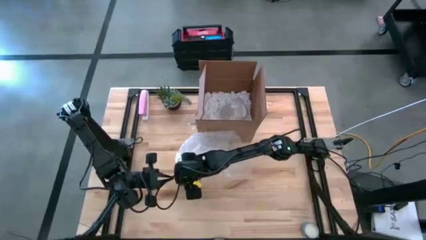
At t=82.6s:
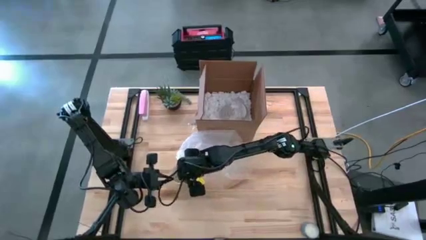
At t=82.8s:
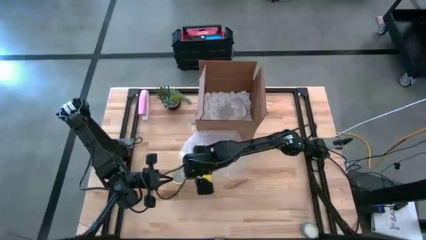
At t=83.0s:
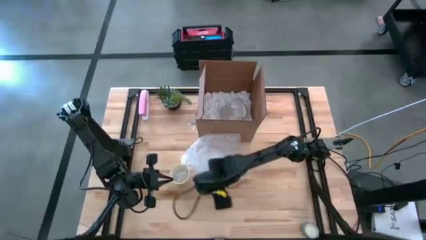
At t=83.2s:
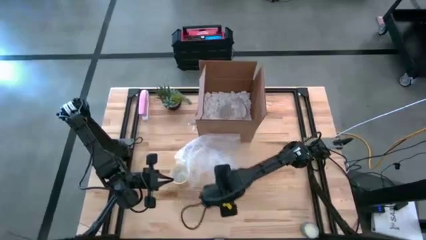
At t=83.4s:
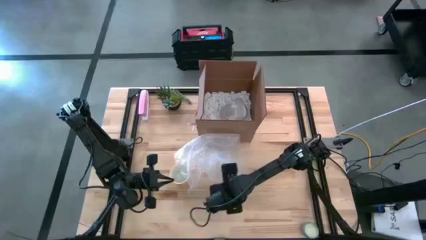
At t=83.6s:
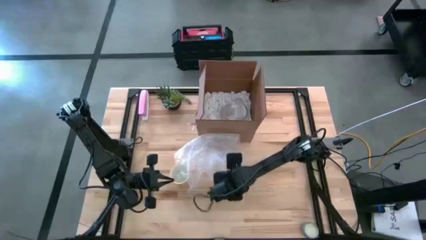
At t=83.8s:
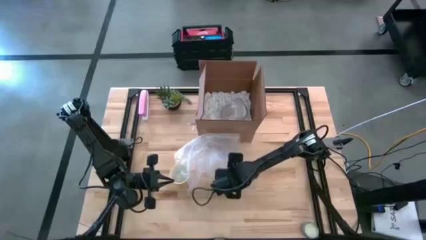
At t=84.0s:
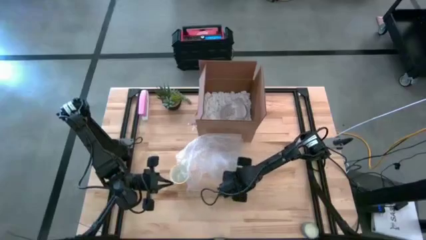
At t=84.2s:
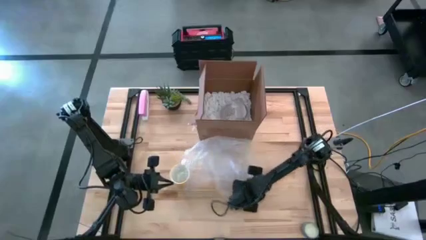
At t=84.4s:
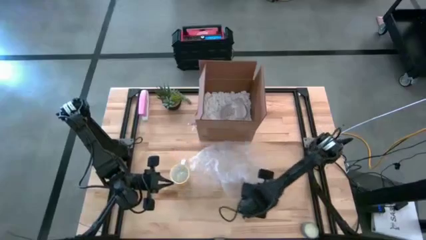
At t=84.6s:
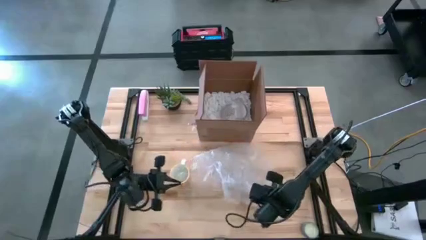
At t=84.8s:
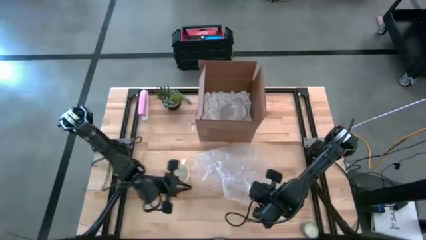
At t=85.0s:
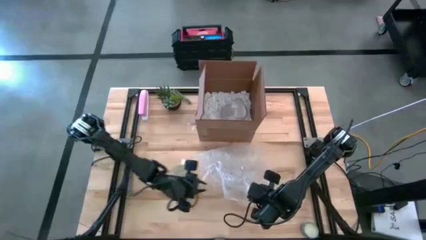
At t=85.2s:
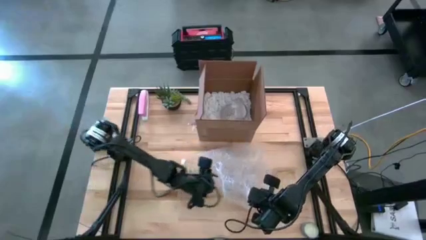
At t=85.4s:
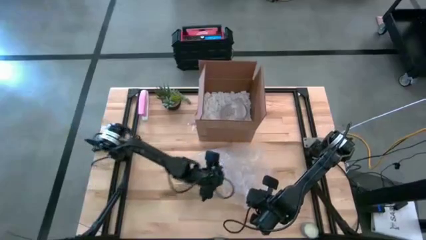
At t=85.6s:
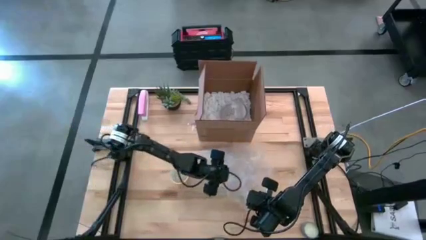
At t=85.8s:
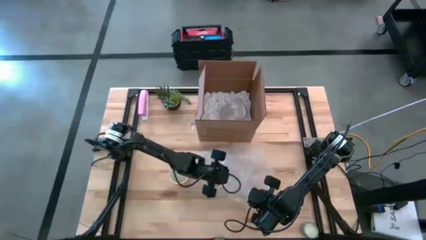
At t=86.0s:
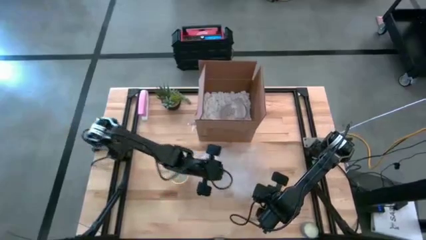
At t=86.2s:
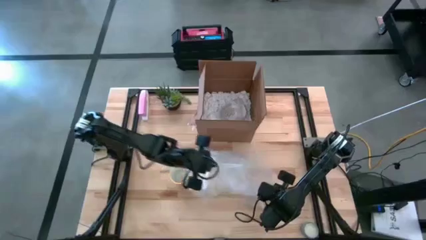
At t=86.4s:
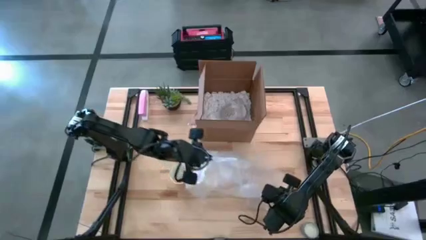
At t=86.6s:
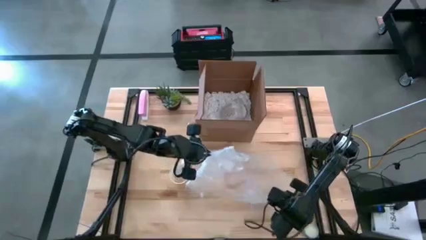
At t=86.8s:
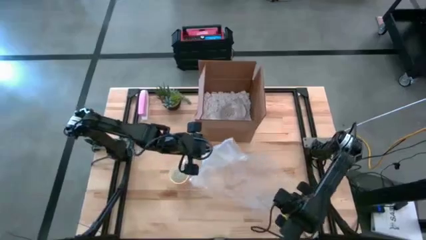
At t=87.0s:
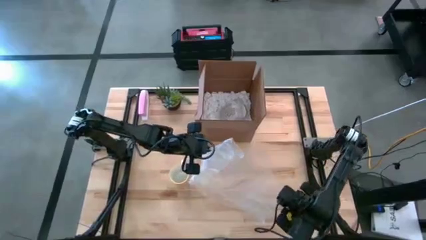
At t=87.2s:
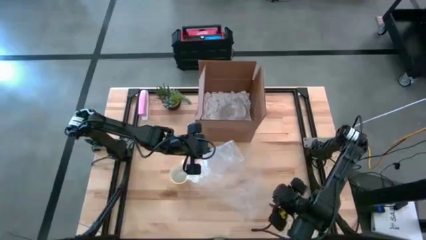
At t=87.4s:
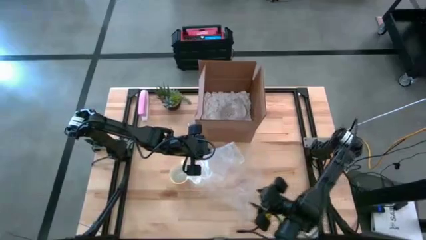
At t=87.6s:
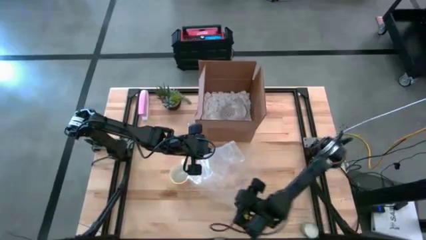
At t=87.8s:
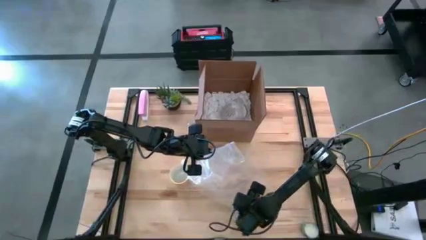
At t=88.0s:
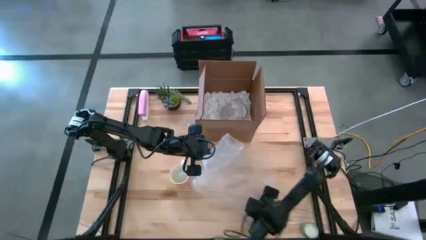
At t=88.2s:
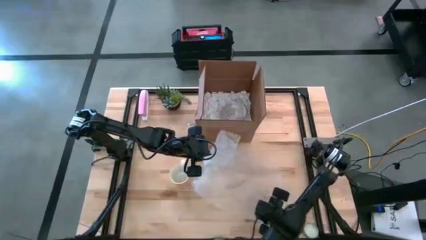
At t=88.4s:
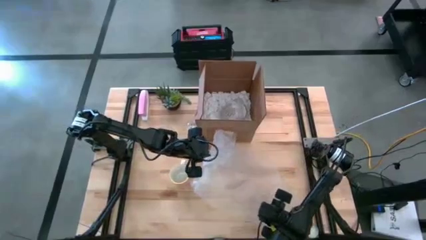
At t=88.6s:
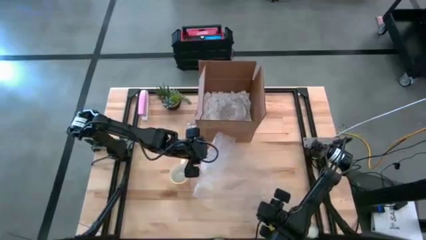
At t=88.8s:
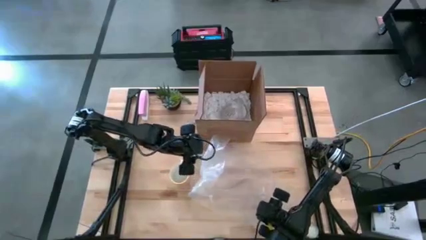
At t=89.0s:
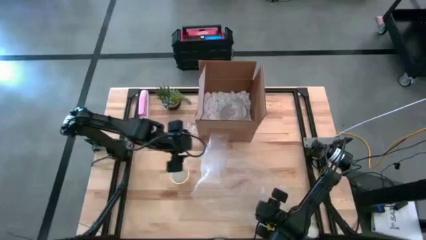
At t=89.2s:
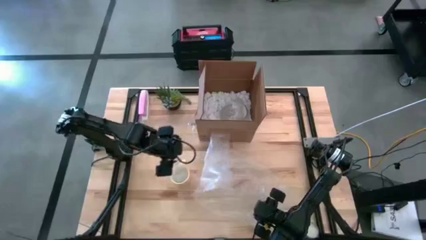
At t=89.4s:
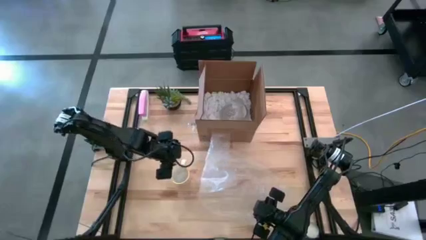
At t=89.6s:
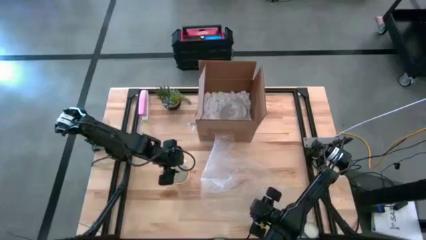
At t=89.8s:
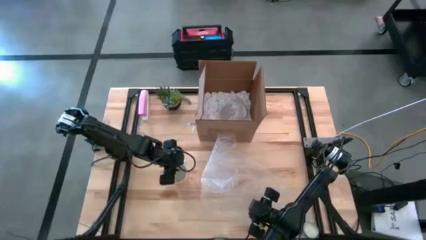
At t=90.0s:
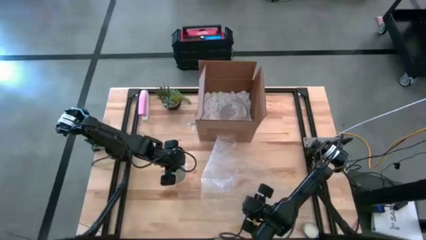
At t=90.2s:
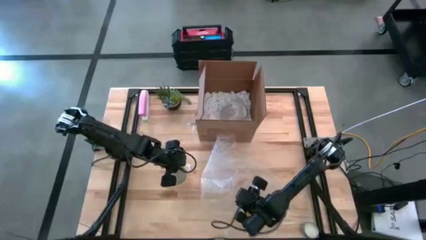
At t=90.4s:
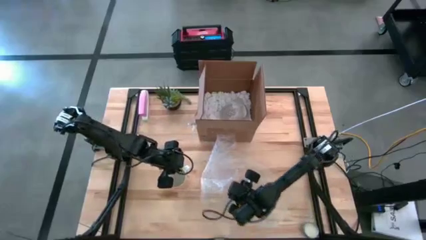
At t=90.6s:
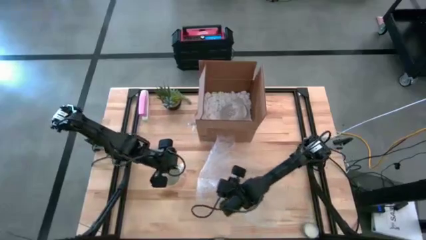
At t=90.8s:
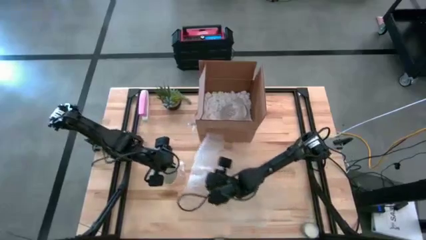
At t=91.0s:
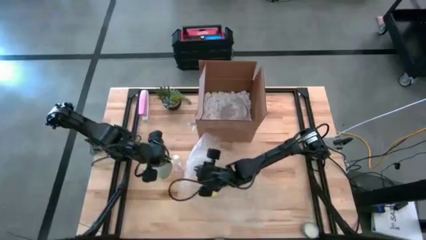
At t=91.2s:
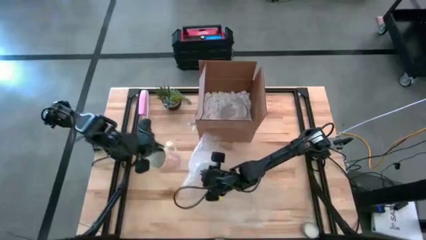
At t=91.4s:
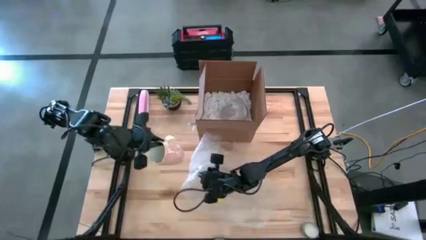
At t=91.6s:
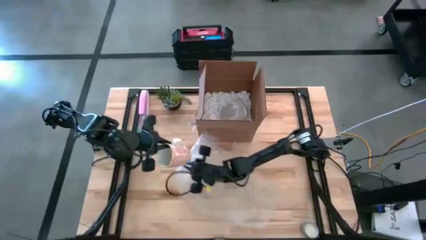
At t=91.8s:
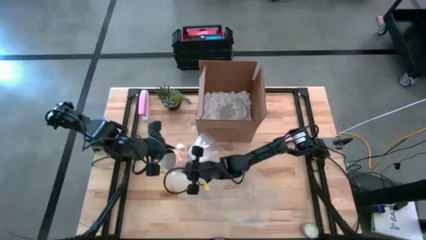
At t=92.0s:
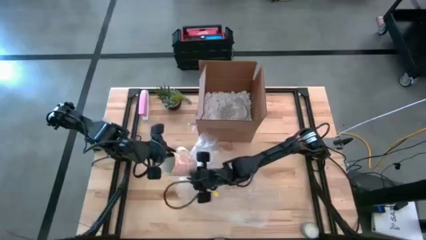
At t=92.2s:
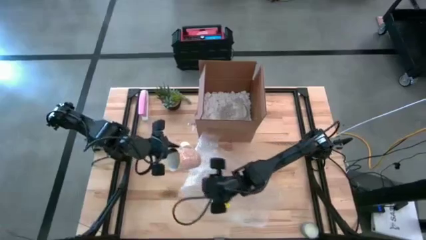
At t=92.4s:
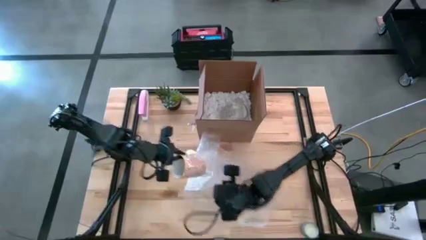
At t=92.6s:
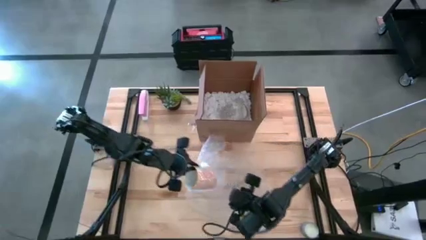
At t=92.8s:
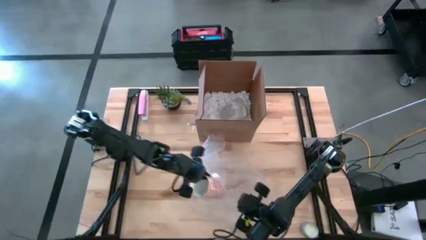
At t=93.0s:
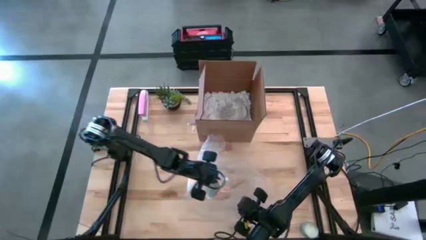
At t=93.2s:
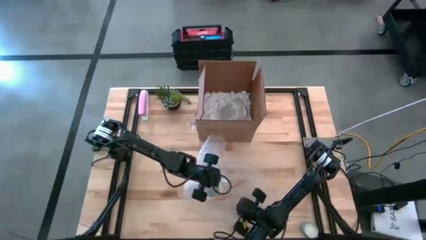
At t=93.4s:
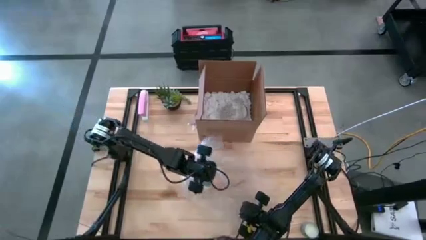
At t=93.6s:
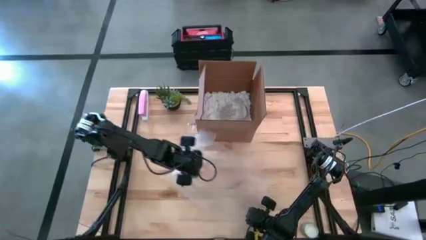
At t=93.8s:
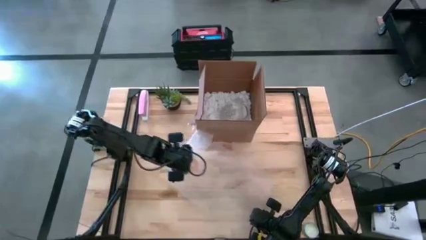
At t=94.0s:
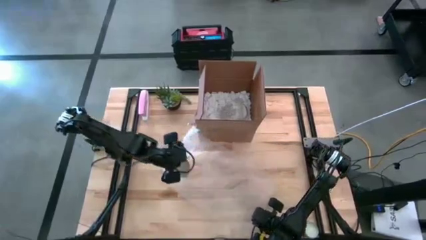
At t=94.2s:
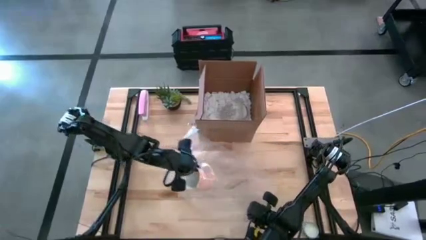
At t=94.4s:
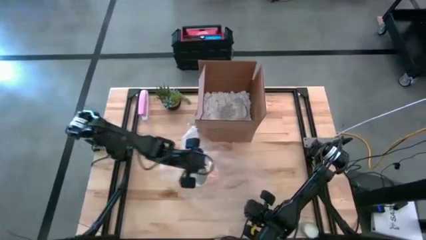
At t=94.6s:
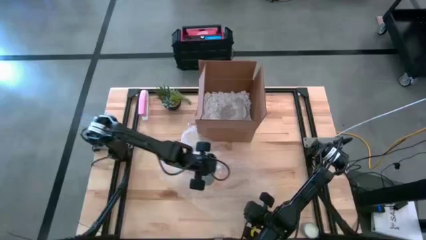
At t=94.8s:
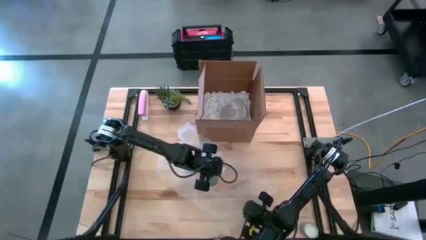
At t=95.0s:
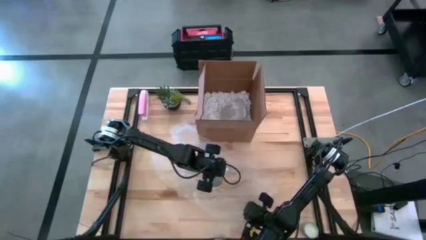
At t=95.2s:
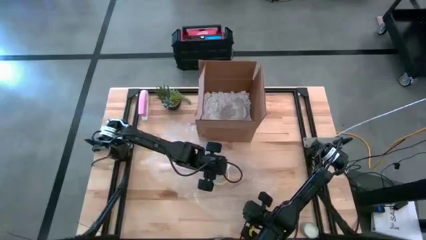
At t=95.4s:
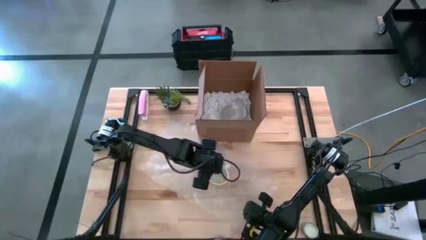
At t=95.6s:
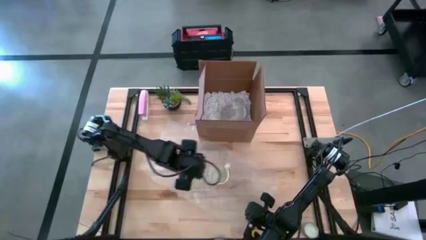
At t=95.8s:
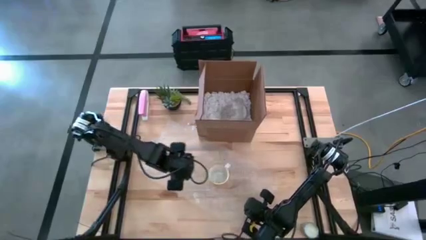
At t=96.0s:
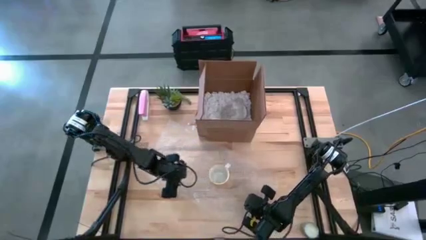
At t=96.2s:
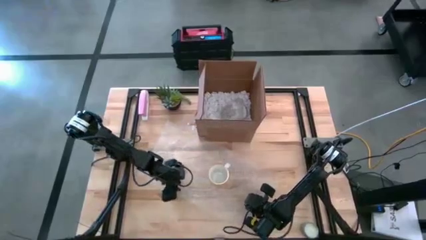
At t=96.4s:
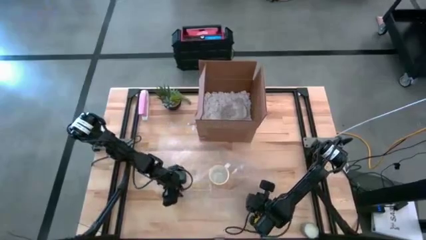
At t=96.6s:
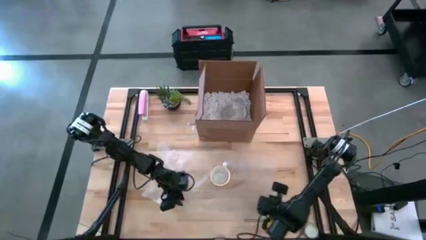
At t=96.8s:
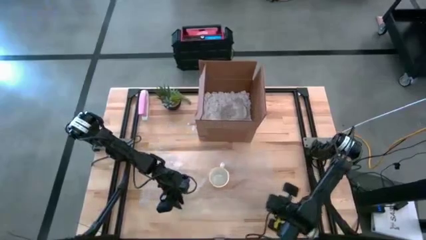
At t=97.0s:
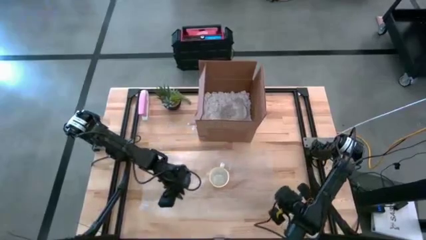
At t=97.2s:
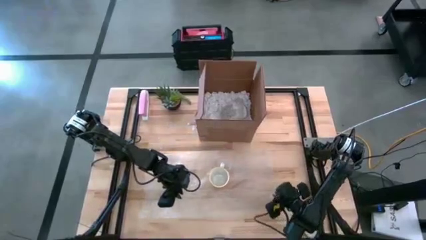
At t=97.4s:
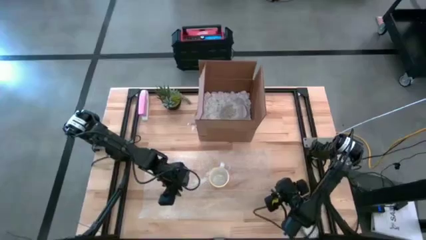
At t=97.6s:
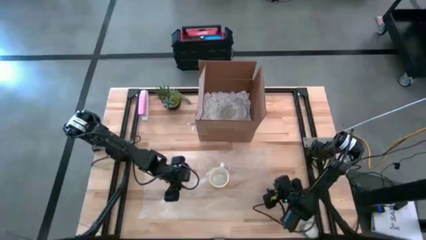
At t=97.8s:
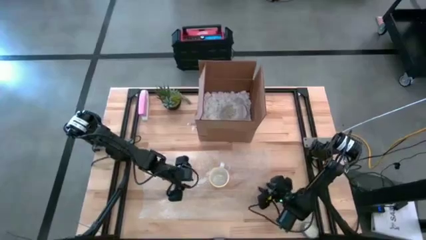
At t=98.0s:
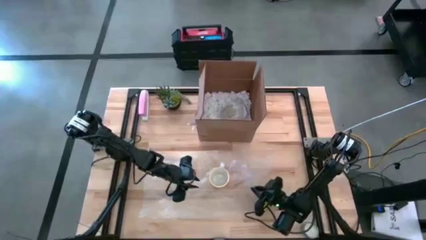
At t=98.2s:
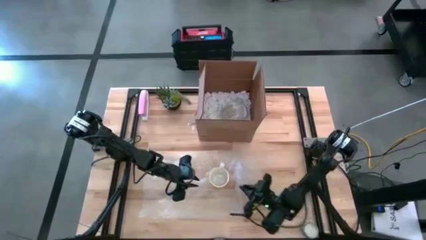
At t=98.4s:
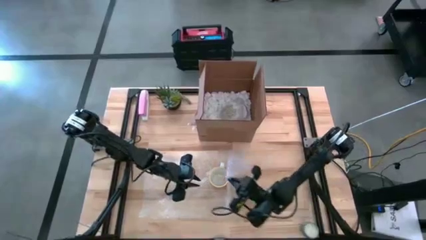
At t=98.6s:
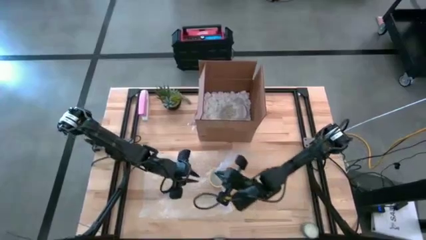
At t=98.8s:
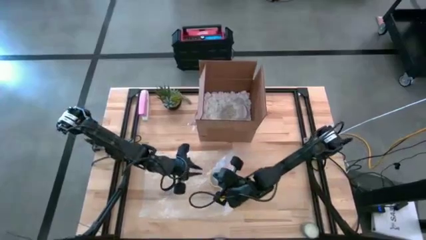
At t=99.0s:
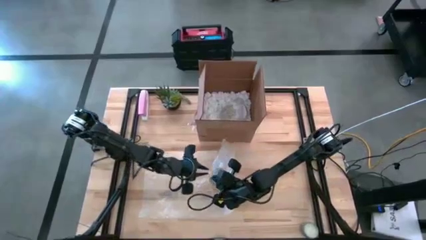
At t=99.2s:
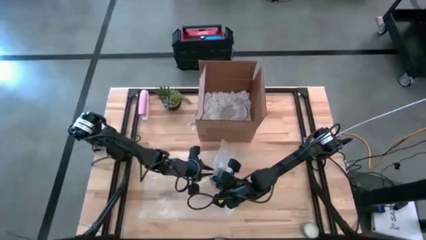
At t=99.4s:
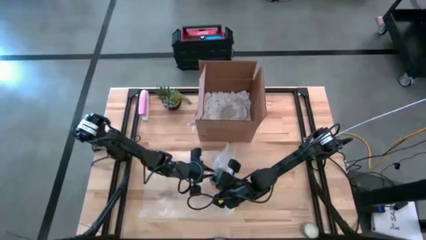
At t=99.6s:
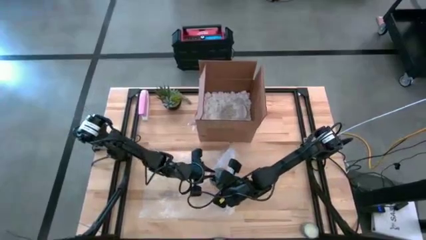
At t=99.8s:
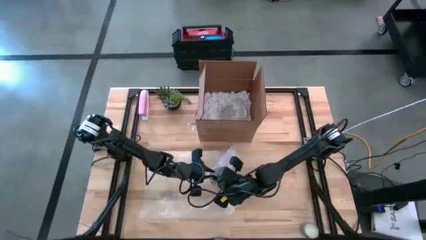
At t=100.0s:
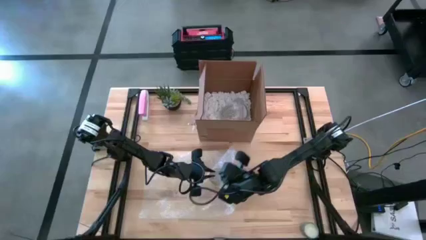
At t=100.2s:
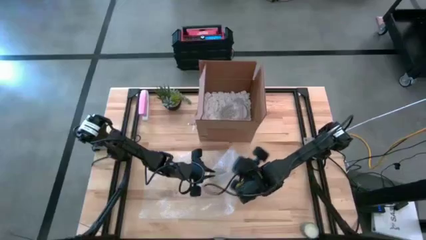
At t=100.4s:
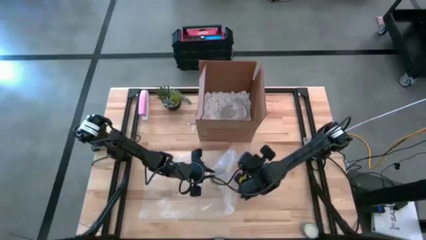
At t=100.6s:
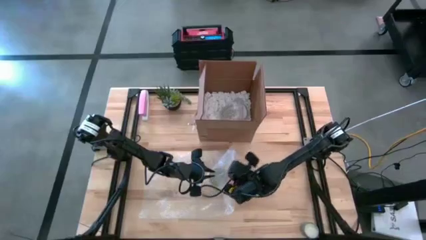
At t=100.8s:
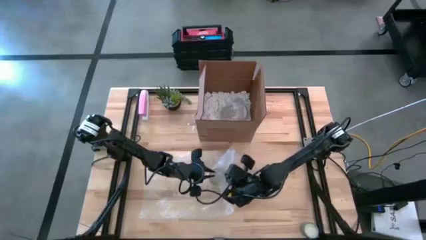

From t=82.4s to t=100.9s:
Task: wrap mug
Wrap the orange mug with bubble wrap
